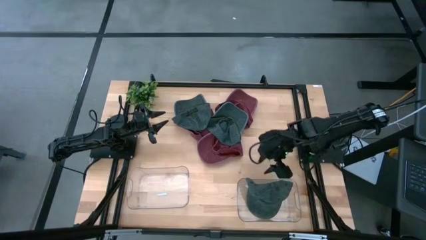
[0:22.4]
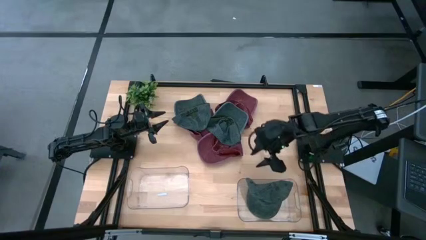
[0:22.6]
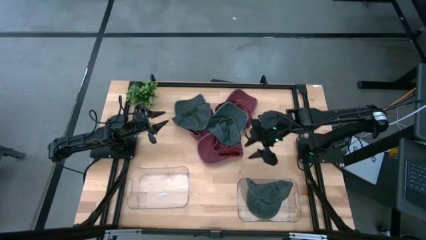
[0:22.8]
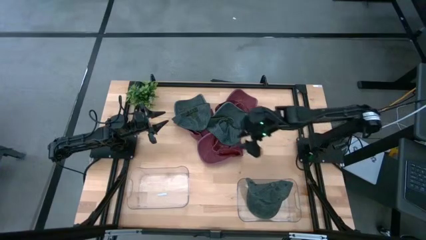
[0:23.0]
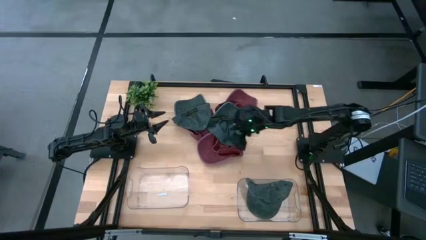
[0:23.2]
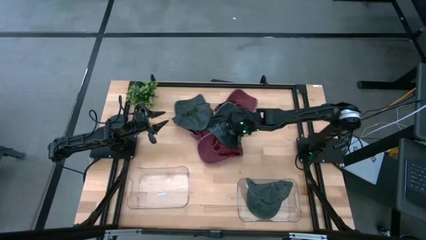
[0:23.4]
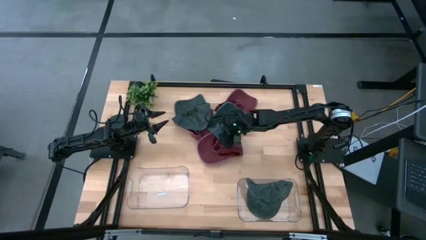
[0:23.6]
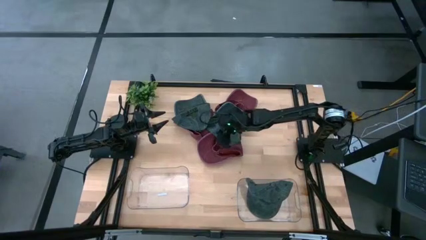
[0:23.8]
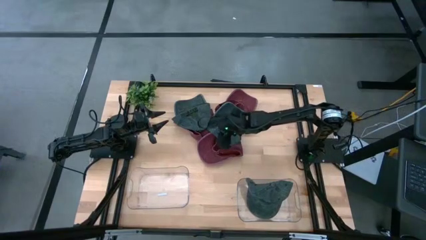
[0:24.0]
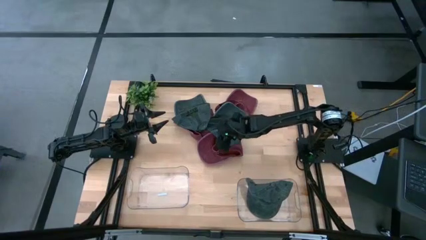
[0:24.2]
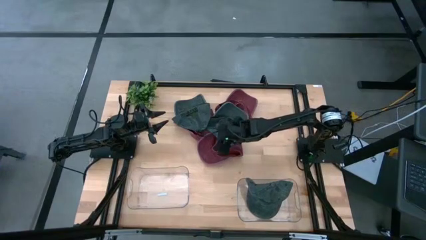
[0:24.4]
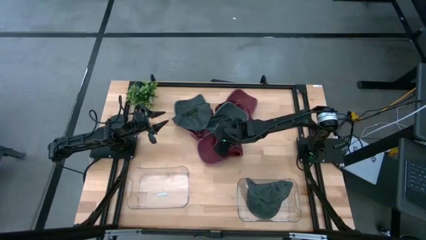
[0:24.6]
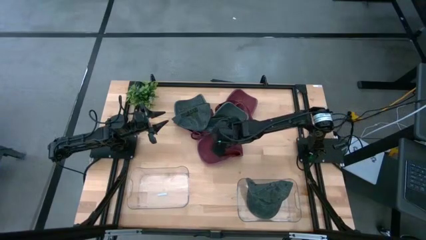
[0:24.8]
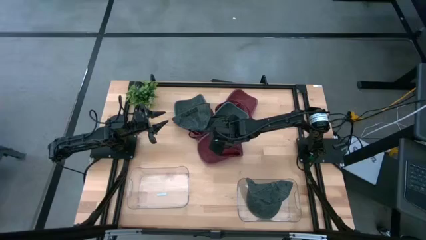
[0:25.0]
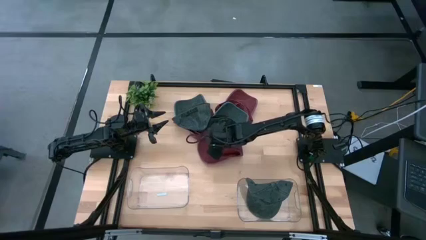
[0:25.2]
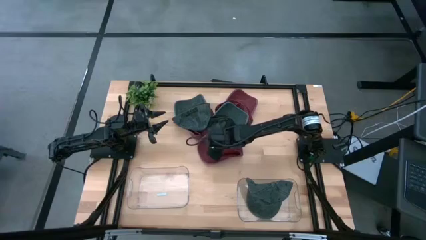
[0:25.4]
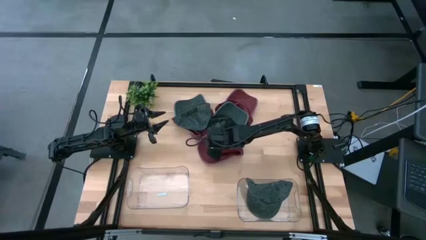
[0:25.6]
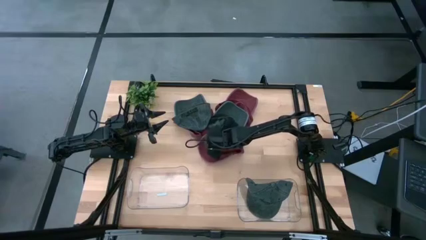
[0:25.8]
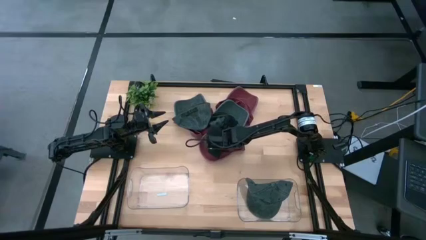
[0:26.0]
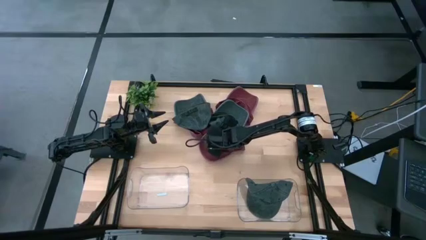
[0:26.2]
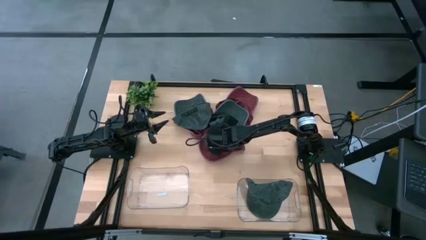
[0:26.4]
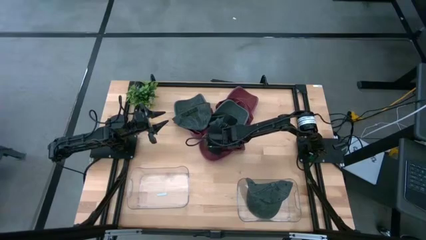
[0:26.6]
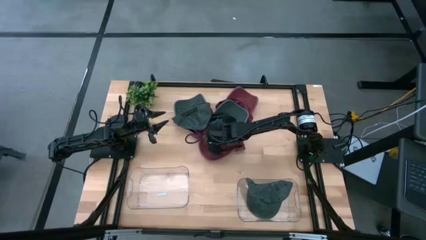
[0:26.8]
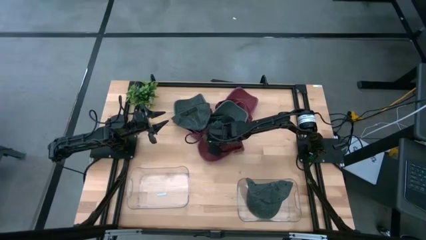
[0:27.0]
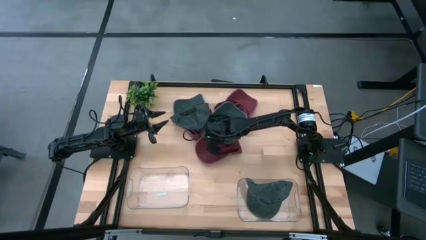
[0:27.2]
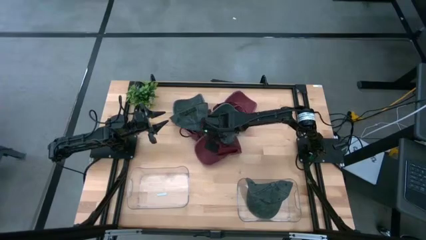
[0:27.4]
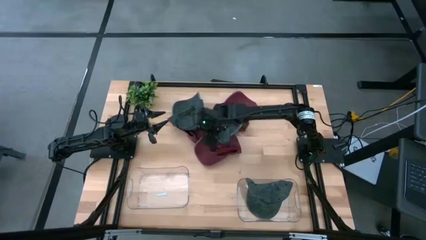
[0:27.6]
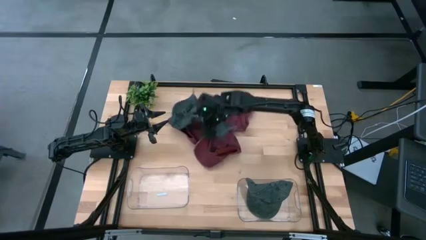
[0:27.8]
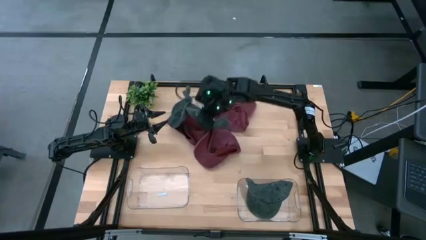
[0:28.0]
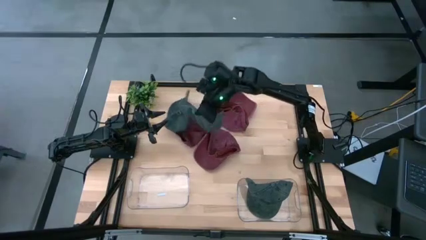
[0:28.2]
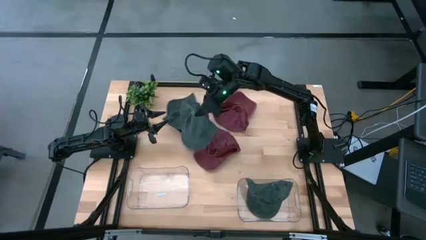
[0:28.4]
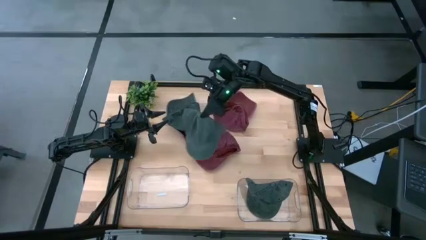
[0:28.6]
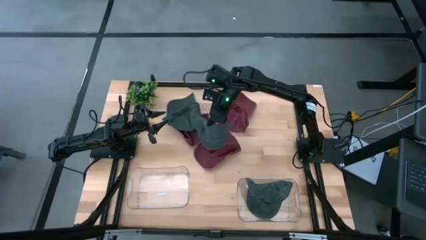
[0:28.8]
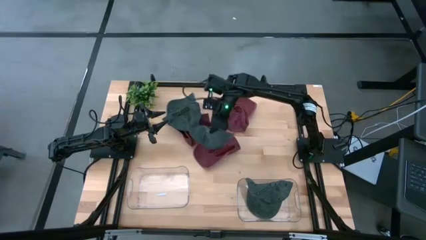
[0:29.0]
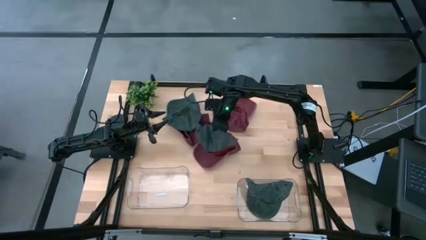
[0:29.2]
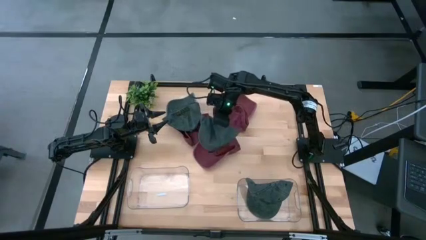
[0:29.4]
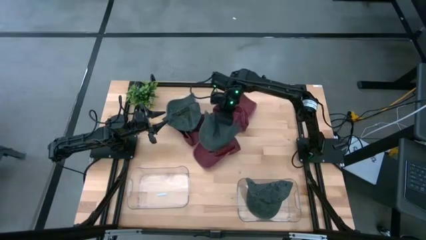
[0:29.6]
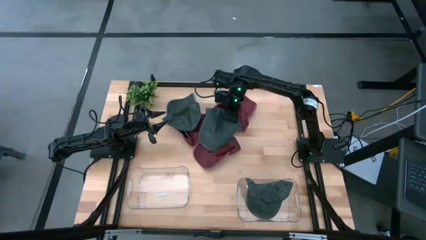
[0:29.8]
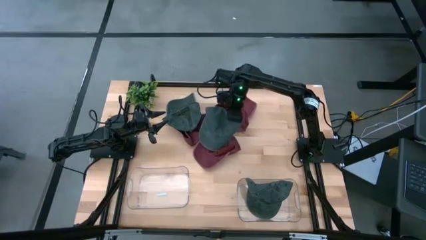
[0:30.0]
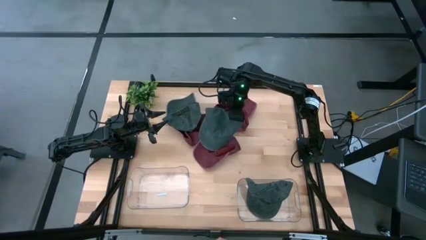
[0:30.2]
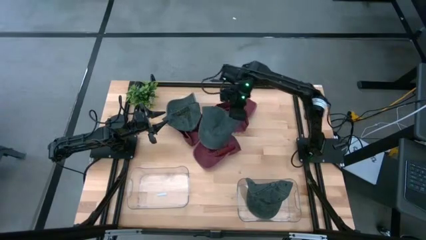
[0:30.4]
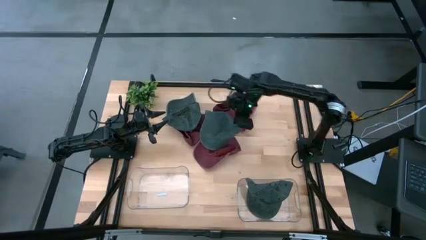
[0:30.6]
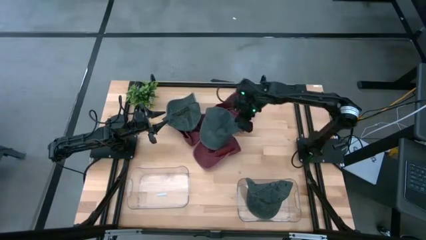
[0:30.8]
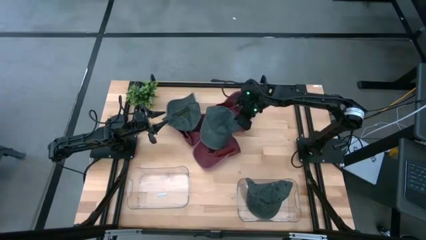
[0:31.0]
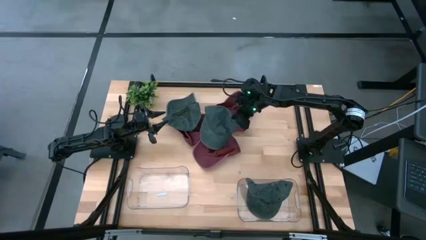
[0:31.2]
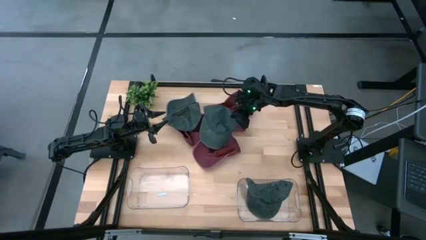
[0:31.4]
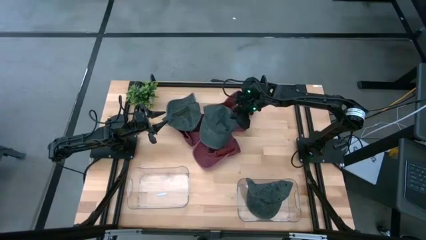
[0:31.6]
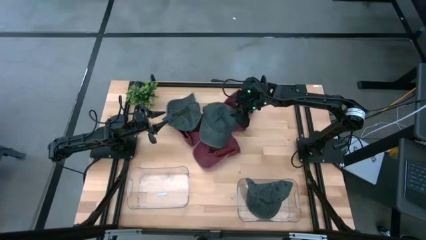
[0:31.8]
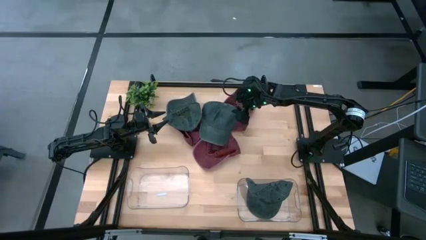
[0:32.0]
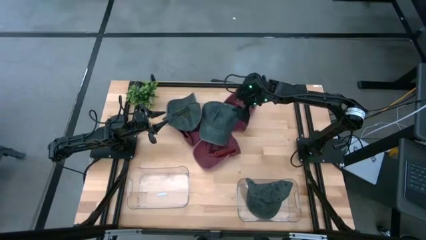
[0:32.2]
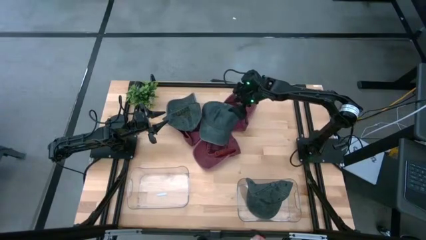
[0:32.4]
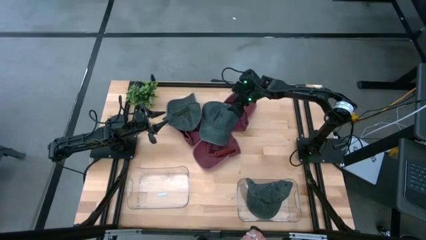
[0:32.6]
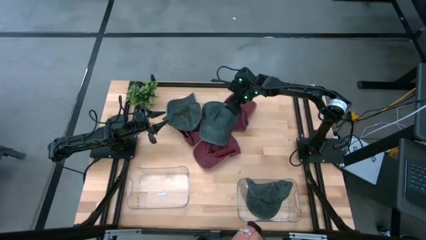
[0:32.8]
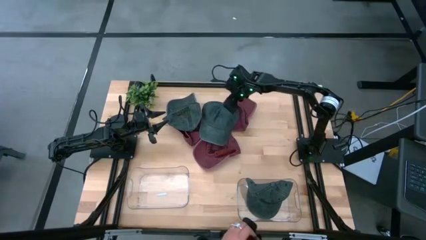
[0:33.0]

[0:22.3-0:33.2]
Task: Pick & Place hat
Put the right black cap into the right transparent bin

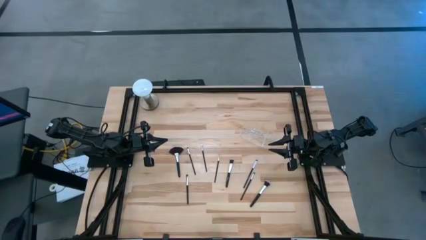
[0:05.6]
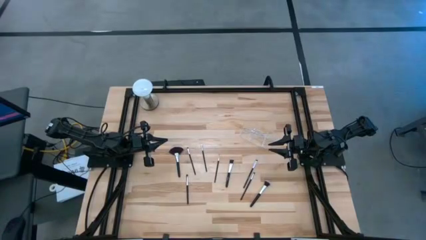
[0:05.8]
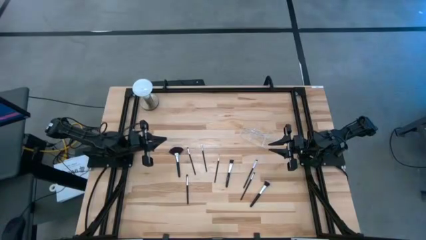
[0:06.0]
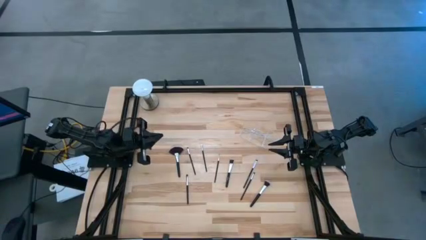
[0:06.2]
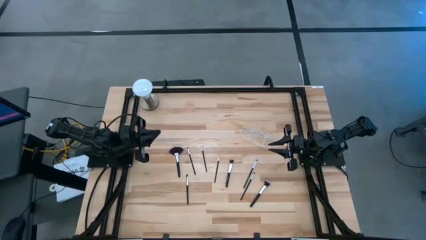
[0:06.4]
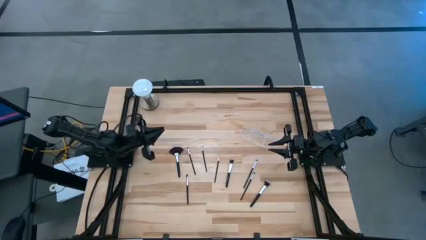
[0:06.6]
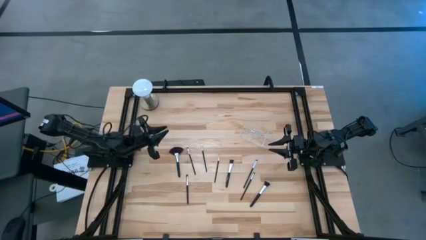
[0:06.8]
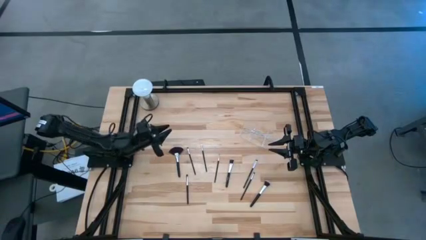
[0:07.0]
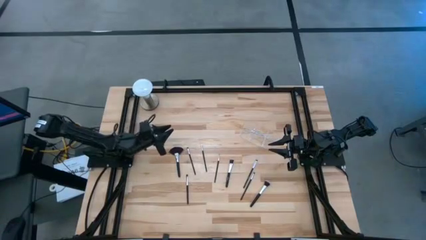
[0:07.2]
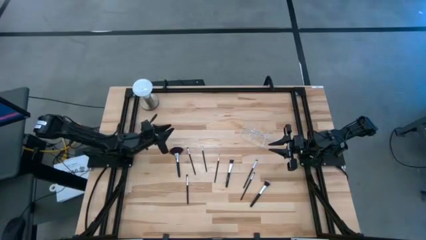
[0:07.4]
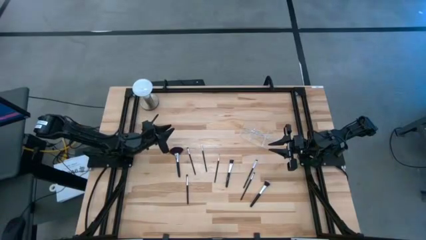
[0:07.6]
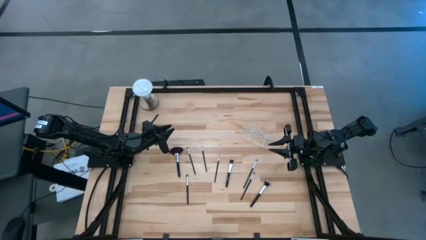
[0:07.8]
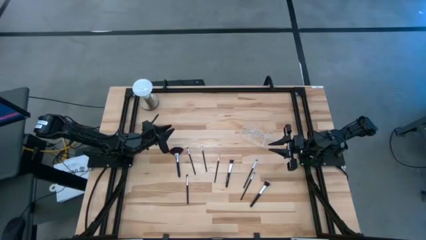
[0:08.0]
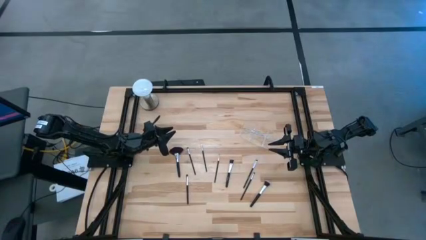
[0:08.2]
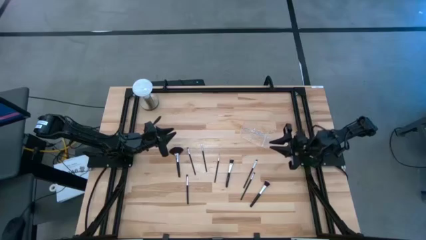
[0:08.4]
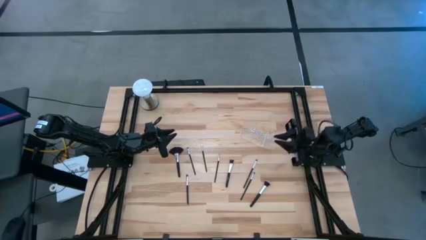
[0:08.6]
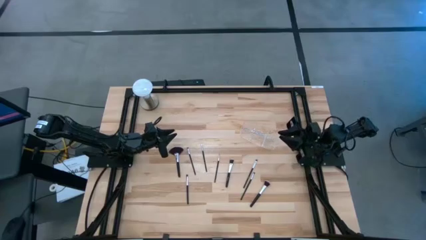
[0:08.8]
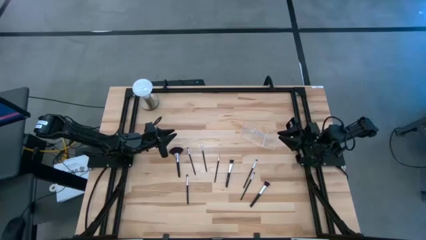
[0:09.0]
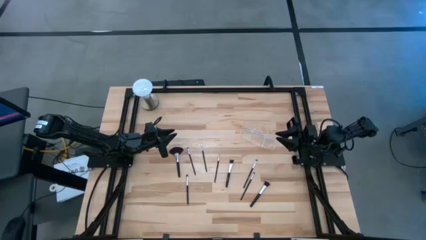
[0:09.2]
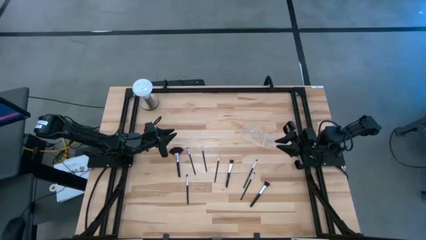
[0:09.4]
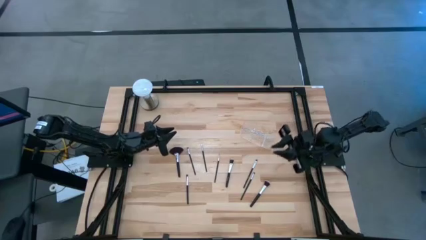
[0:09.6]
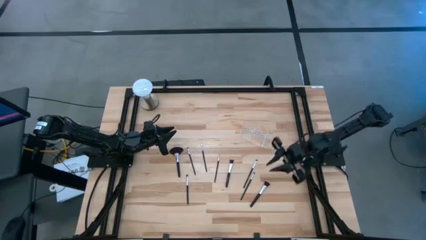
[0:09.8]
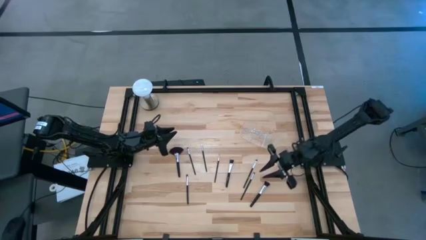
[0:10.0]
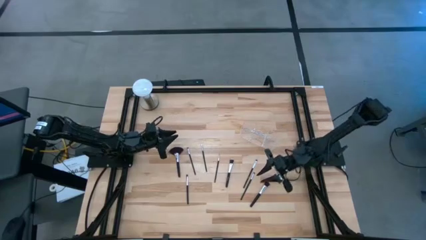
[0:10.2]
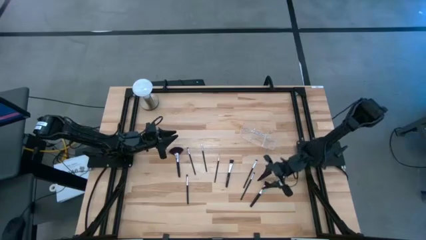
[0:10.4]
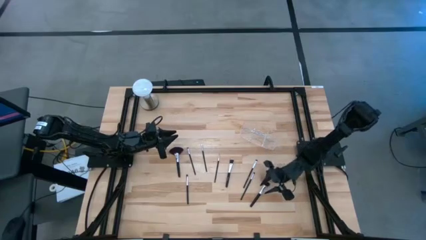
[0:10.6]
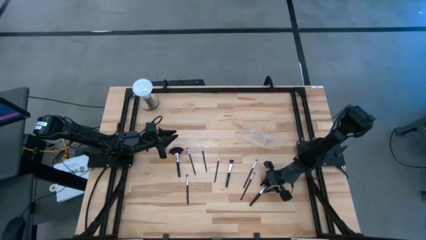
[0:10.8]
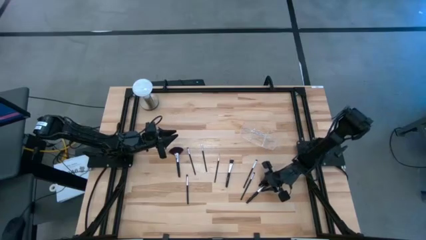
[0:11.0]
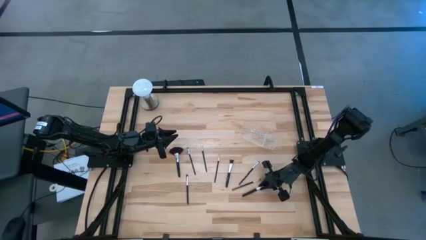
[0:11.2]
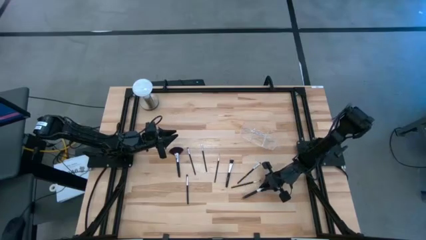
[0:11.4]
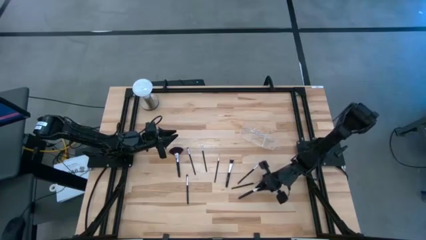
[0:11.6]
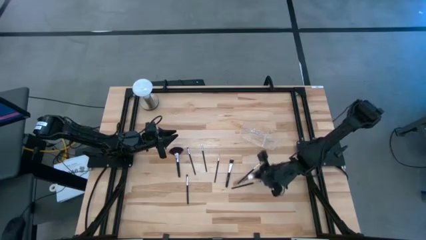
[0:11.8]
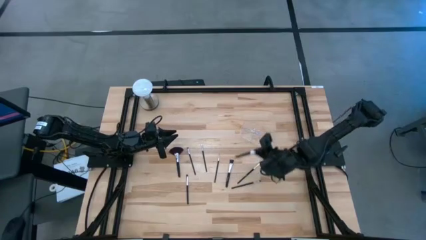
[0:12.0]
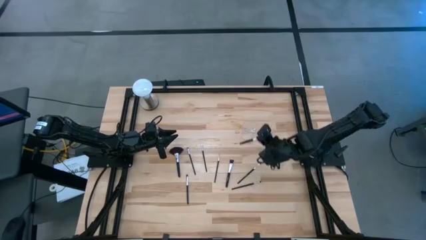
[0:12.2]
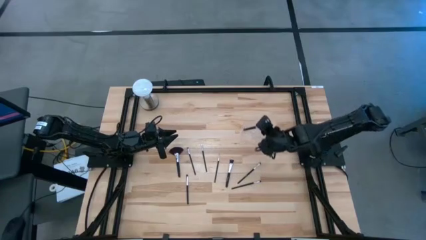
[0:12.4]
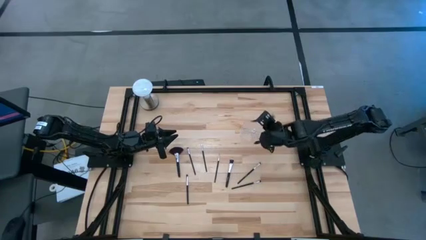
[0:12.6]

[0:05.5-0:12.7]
Task: Pick & Place Makeup Supplies
Put the black makeup brush into the transparent organizer
